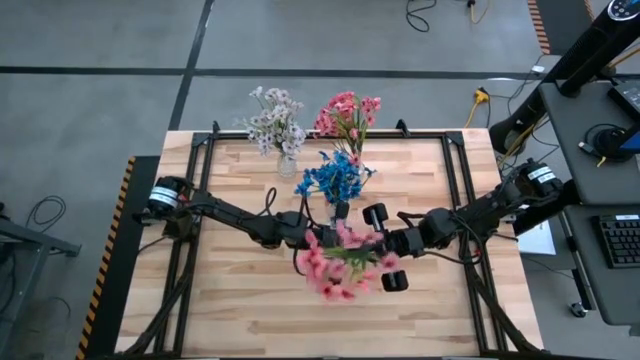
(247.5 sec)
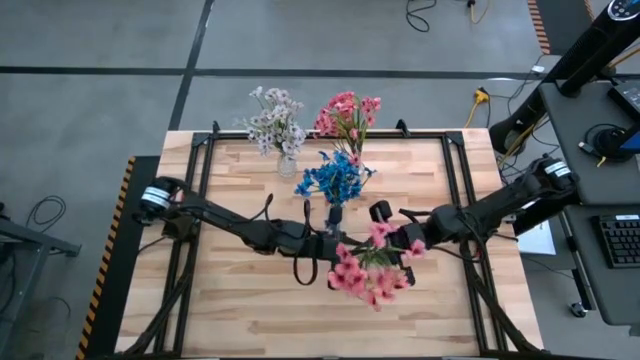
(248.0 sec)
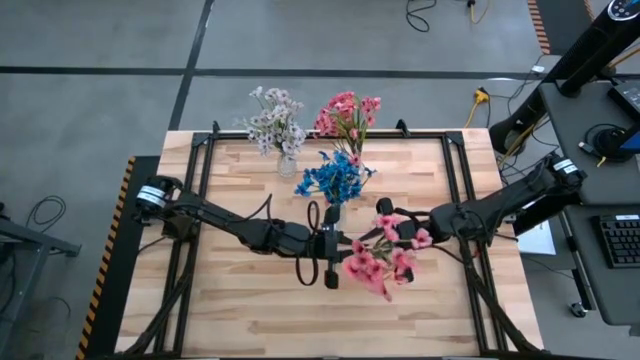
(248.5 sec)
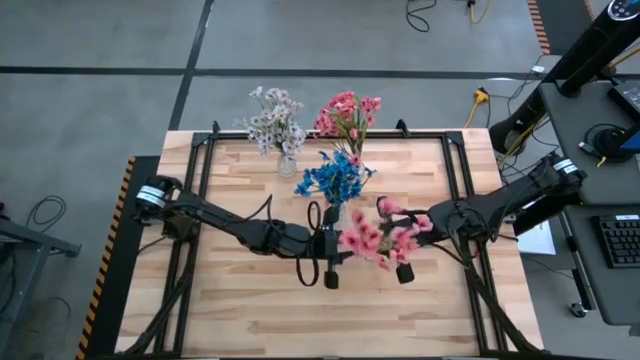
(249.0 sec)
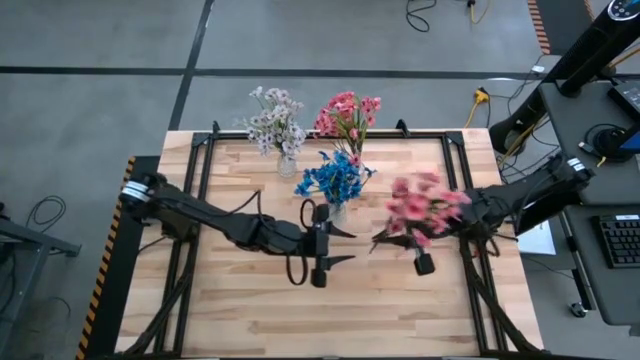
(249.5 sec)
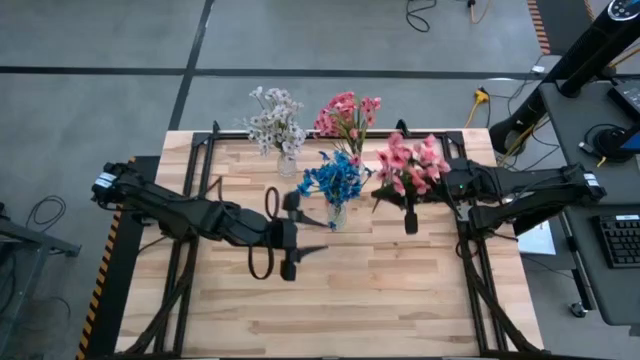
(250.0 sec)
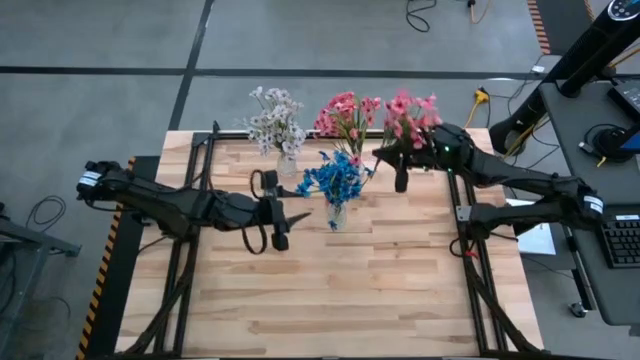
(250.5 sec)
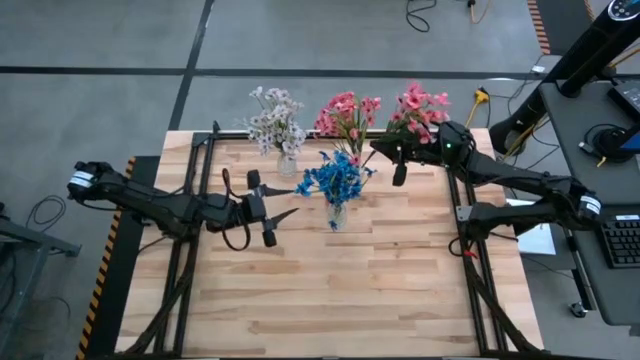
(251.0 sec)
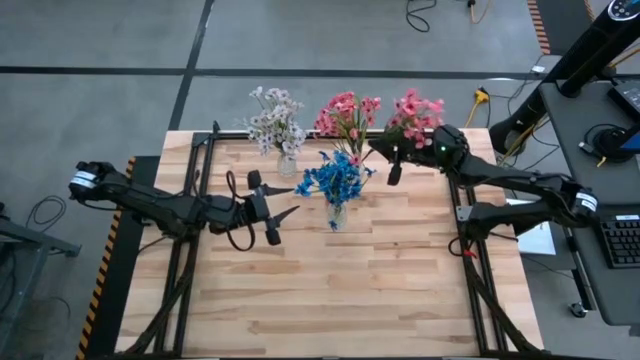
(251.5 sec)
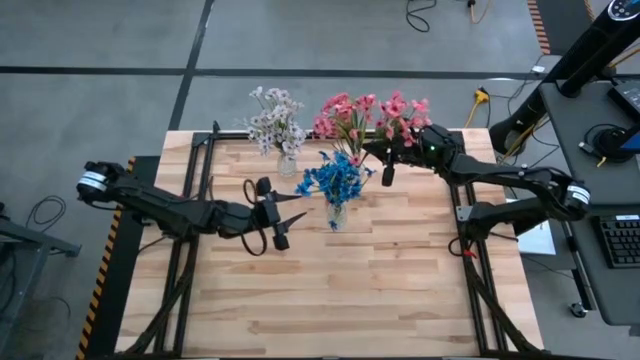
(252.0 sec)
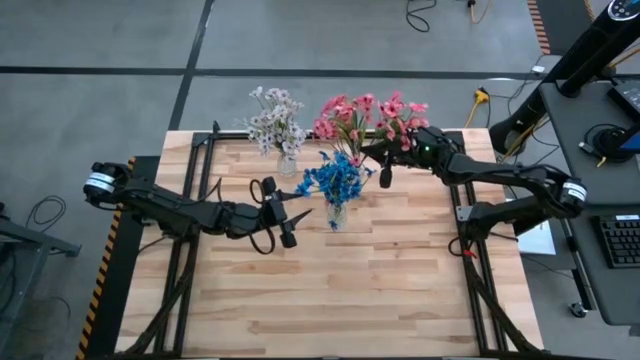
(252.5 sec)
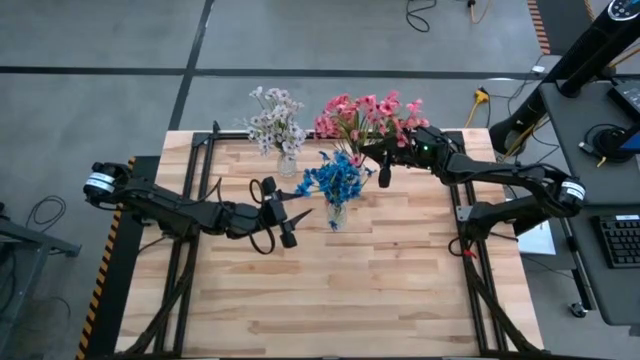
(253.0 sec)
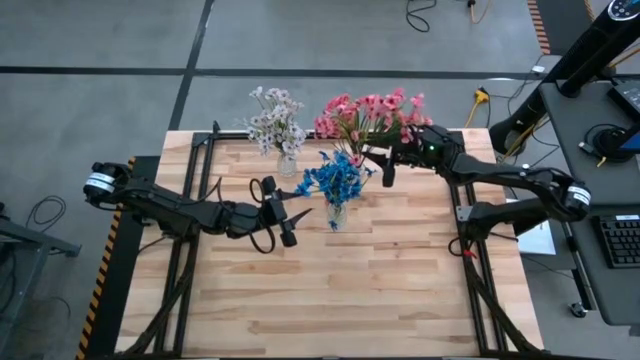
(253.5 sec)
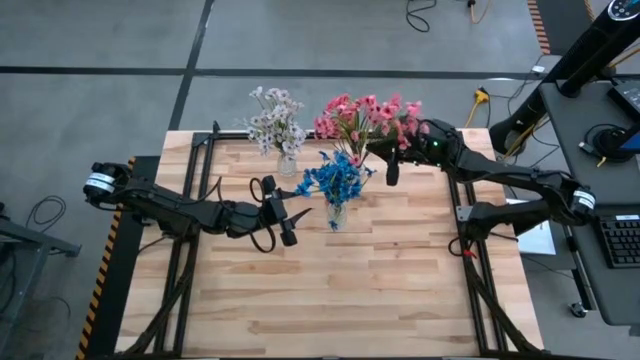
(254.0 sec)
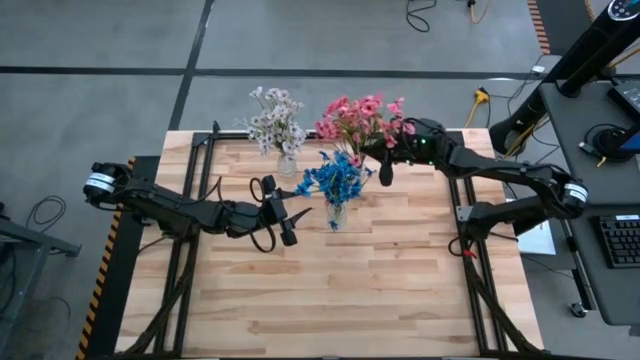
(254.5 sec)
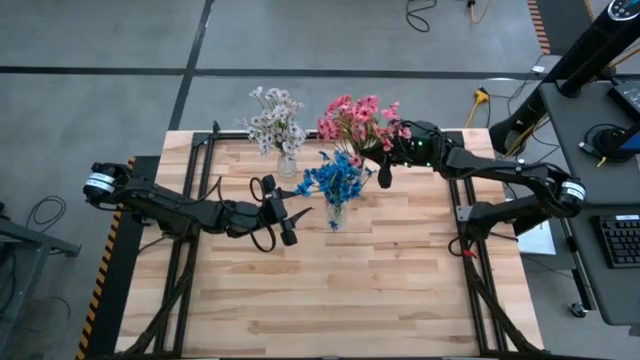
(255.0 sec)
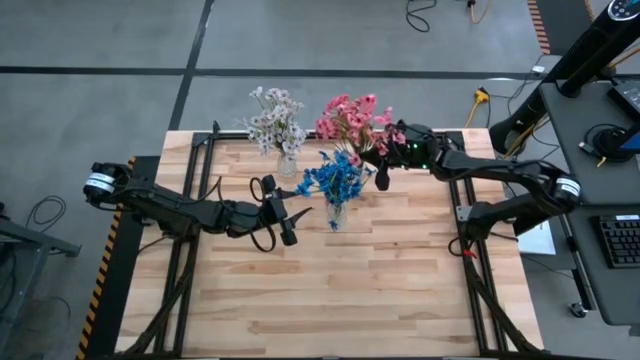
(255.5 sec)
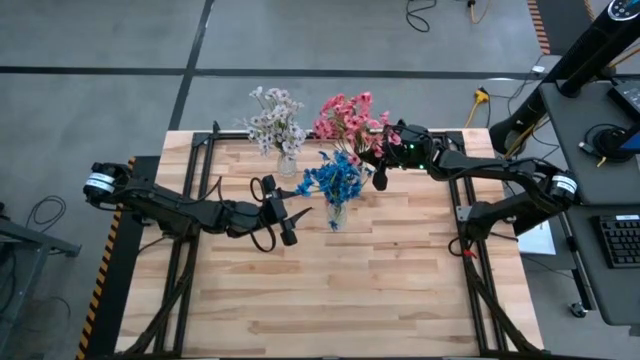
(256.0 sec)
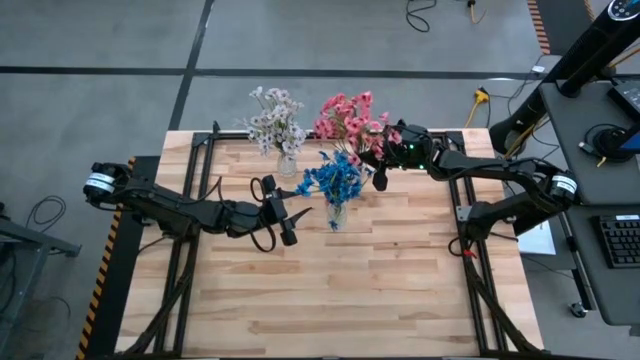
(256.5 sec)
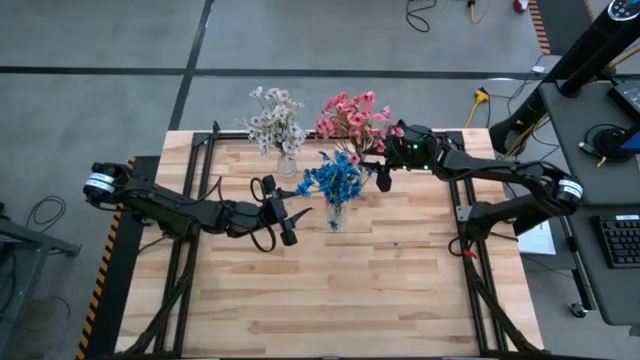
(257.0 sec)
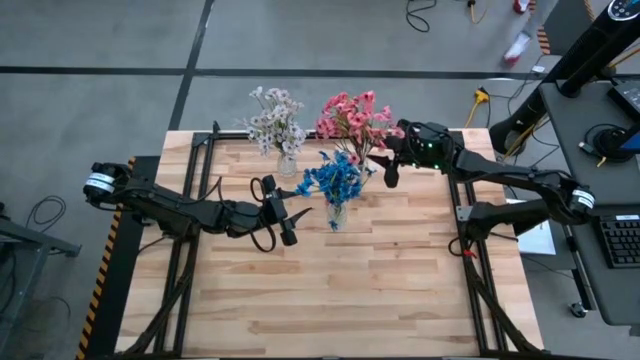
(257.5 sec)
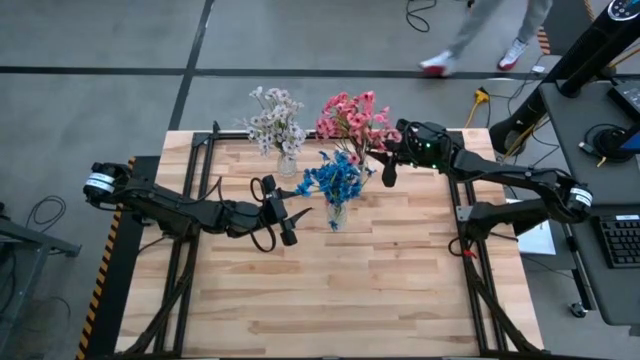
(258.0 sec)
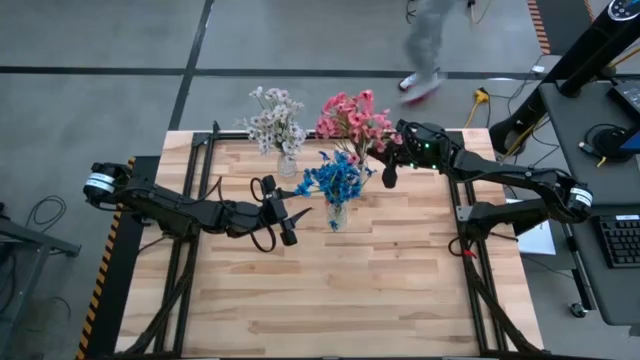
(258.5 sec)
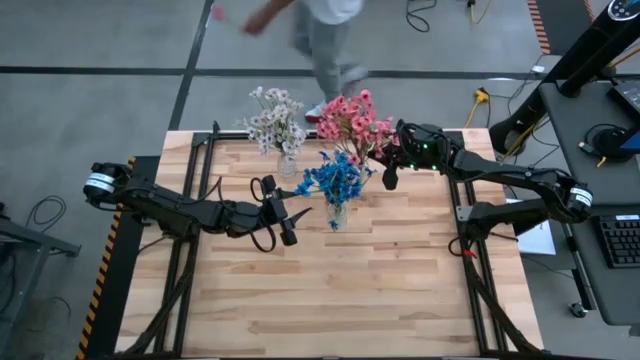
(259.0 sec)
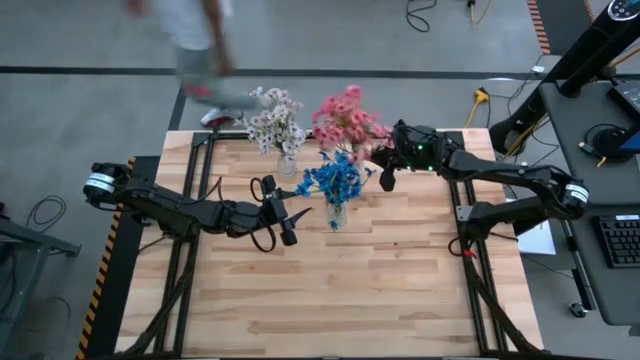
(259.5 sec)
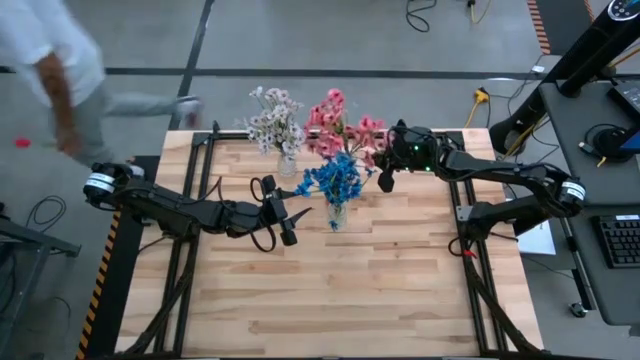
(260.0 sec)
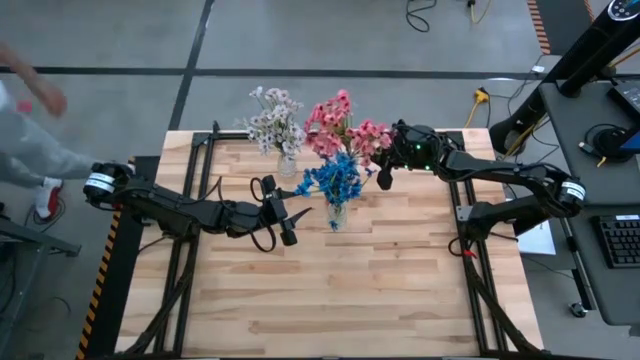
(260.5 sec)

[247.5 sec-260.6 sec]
Task: Sort flowers into vase by color
Put the pink flowers into the right transparent vase

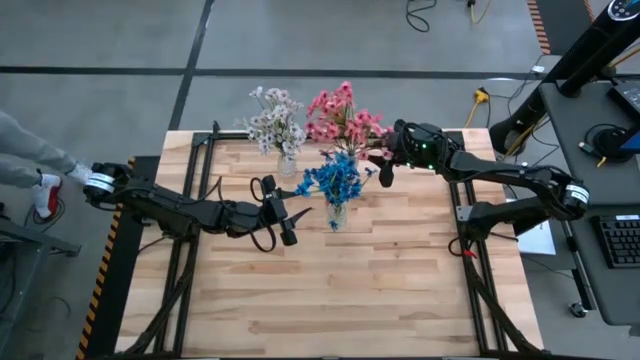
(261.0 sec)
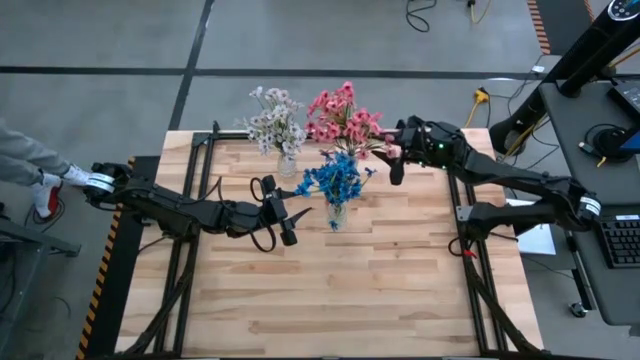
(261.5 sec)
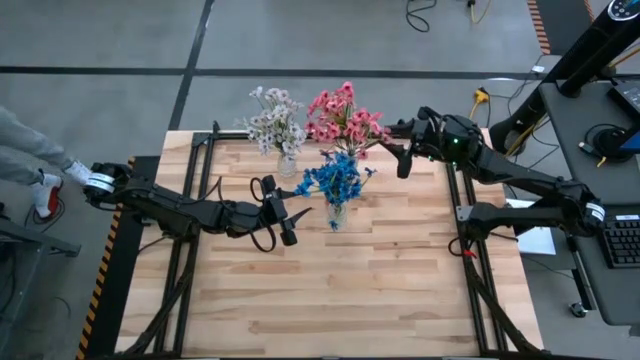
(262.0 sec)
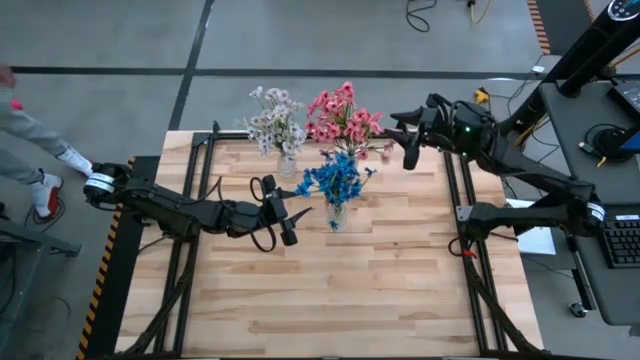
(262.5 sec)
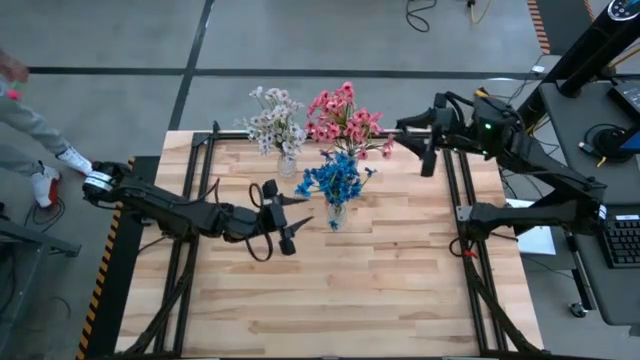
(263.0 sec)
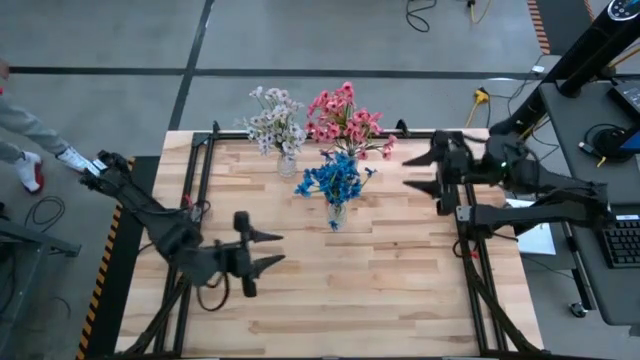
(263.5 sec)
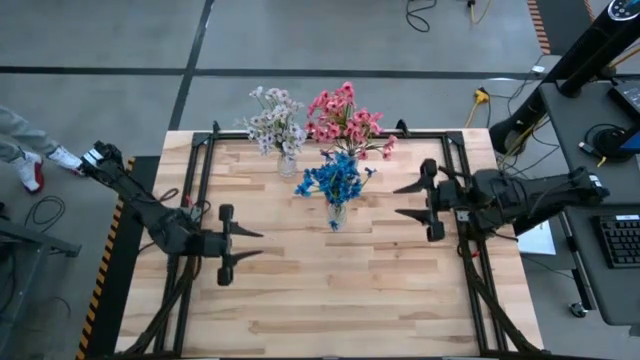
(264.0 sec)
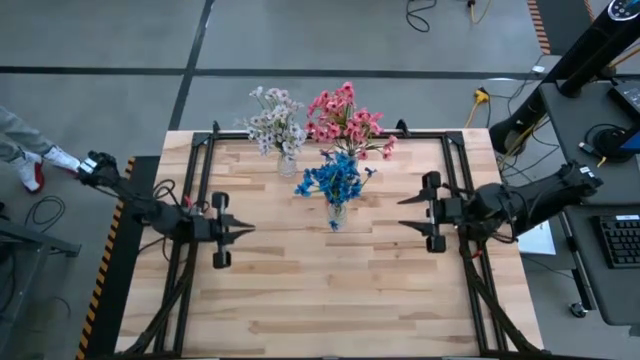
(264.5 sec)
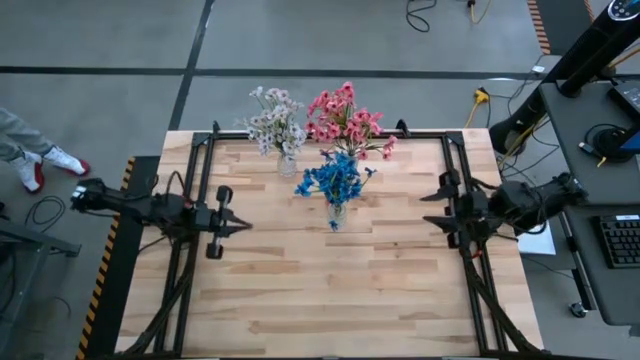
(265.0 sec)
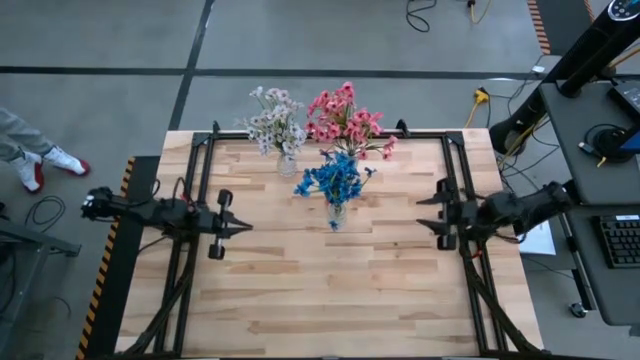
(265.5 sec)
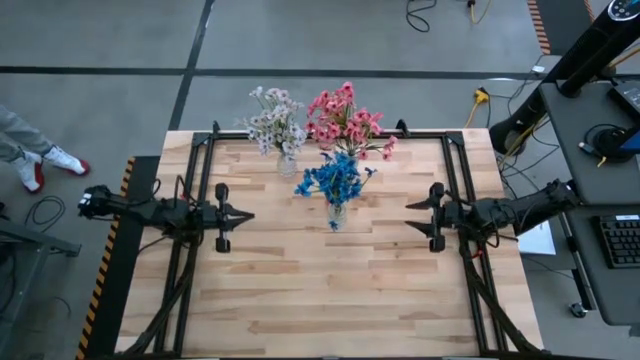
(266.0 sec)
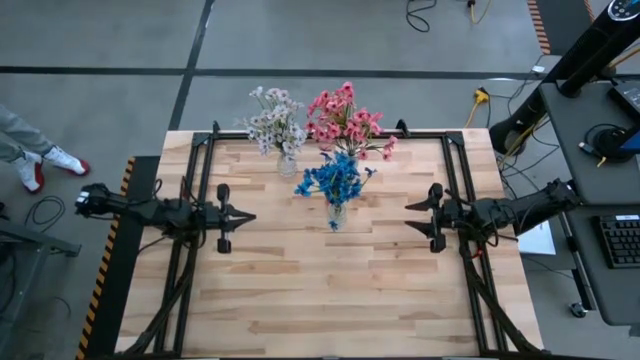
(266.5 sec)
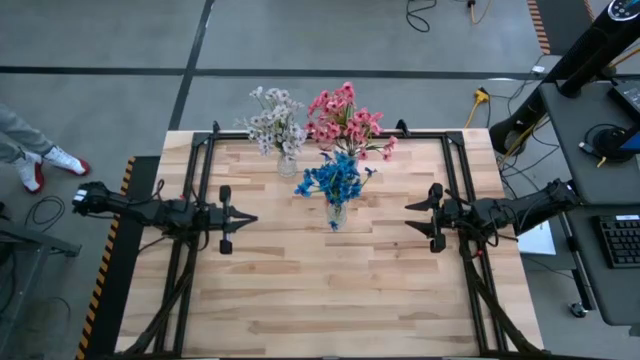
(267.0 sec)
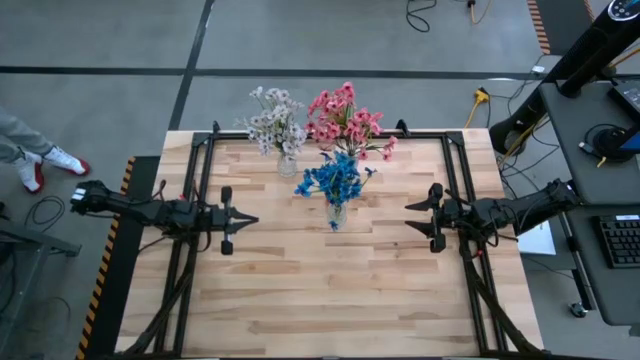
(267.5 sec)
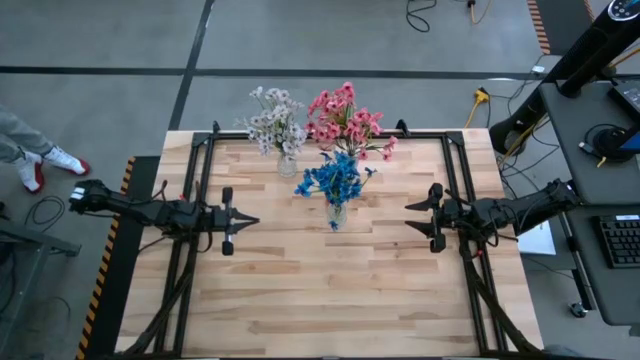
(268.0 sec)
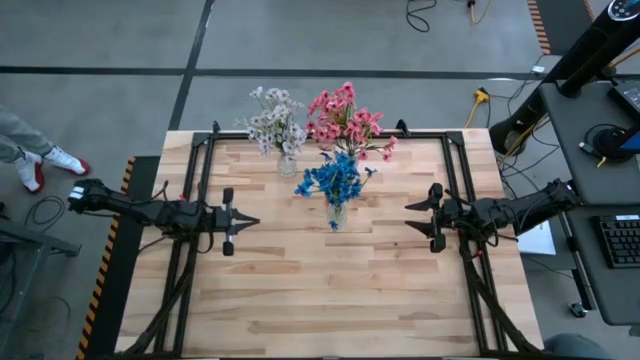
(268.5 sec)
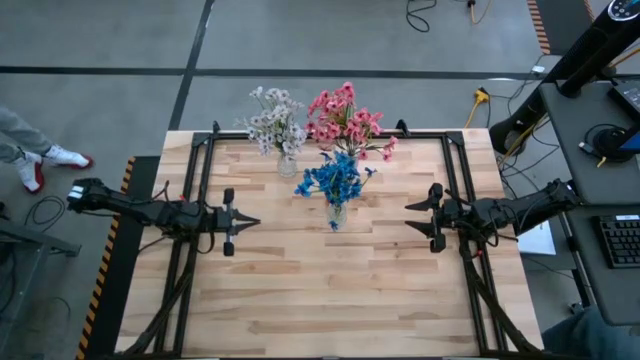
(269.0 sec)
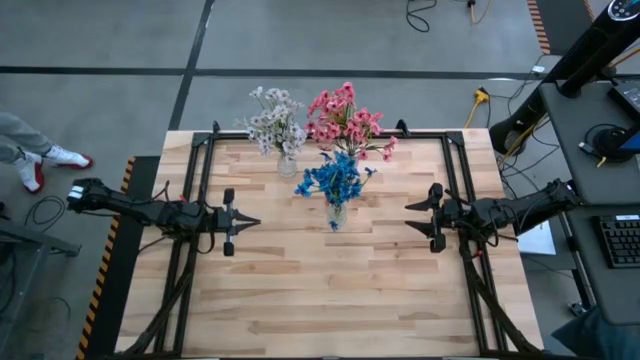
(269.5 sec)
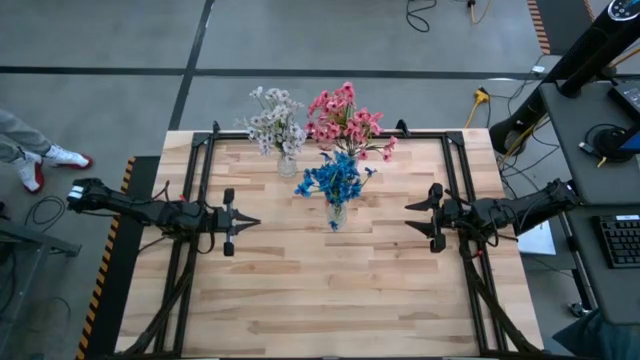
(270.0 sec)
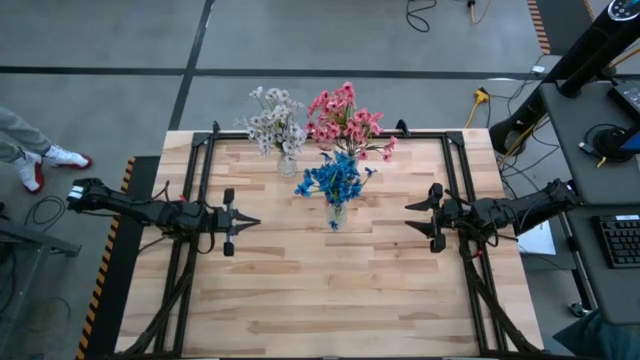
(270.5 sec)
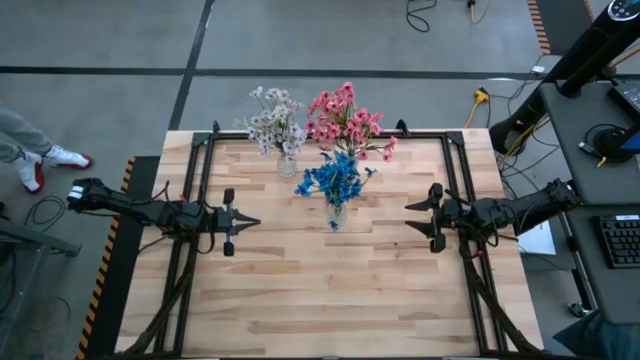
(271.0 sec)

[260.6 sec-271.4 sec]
Return to Home Position
